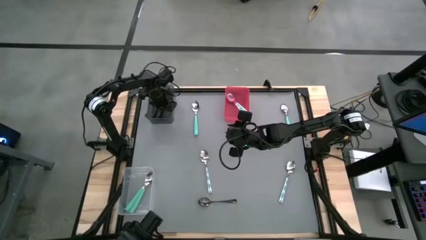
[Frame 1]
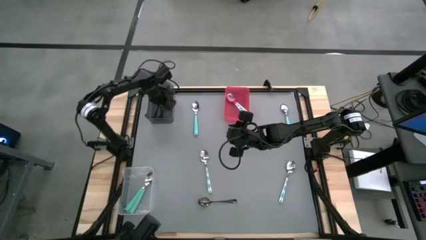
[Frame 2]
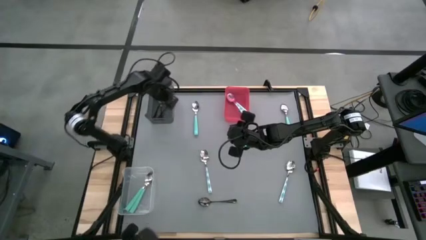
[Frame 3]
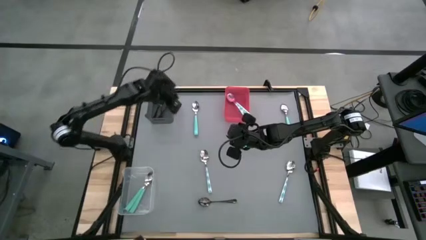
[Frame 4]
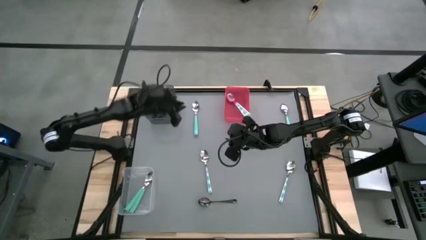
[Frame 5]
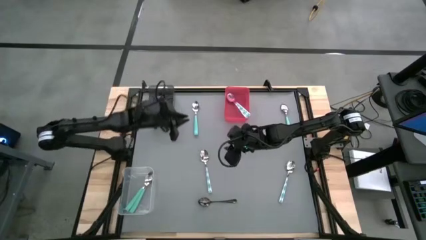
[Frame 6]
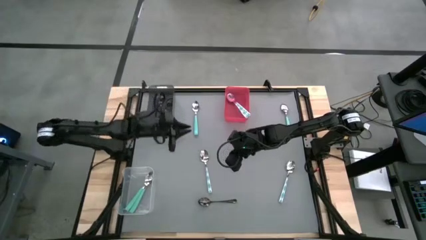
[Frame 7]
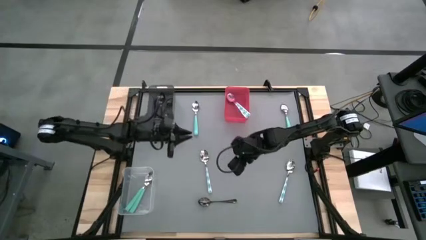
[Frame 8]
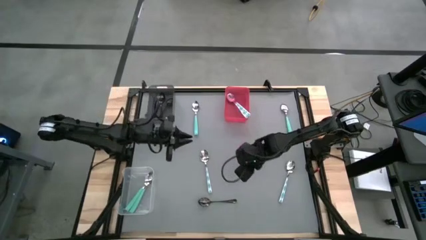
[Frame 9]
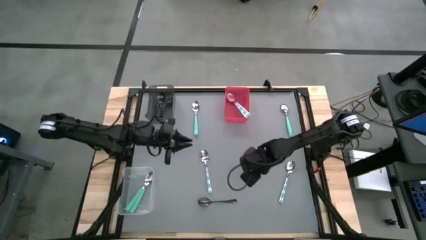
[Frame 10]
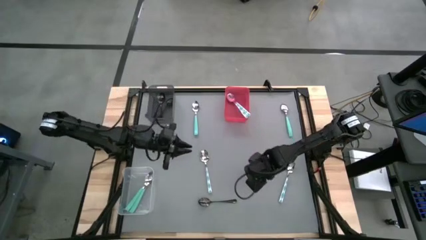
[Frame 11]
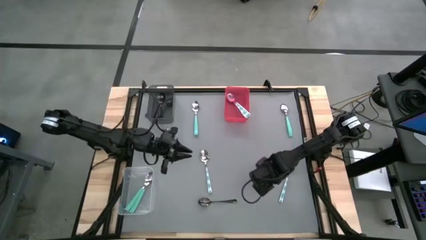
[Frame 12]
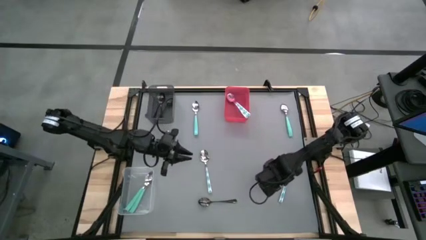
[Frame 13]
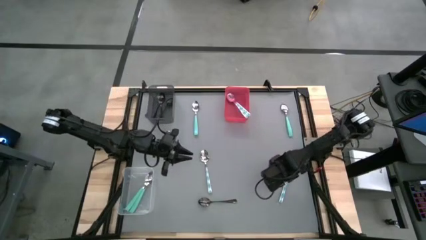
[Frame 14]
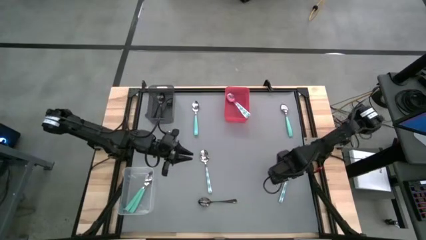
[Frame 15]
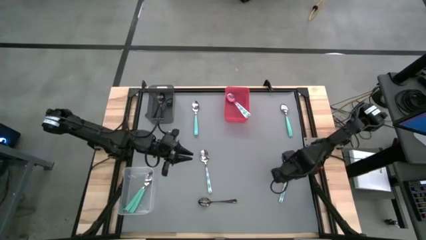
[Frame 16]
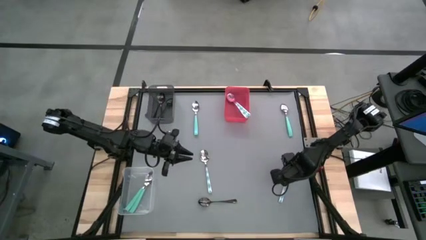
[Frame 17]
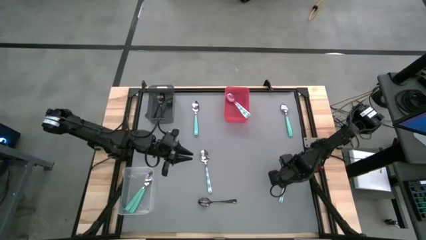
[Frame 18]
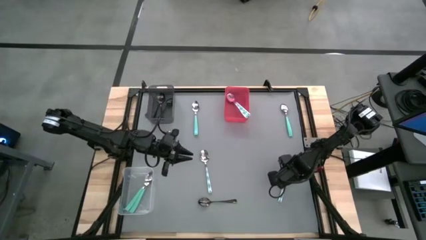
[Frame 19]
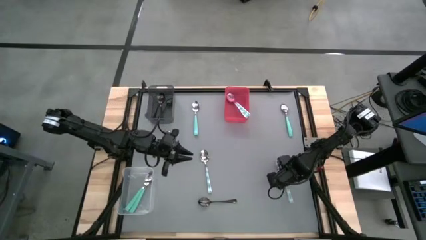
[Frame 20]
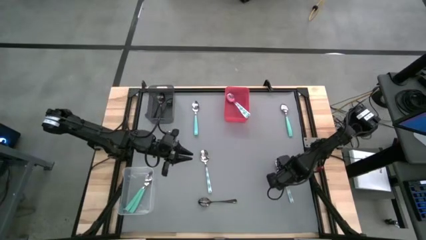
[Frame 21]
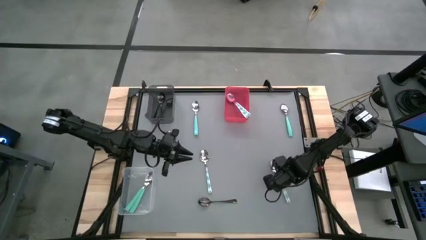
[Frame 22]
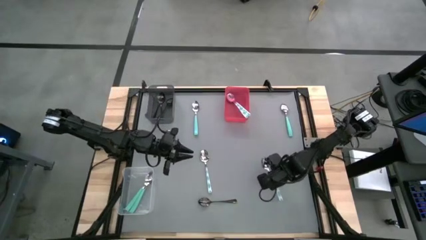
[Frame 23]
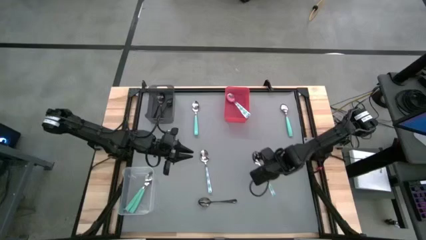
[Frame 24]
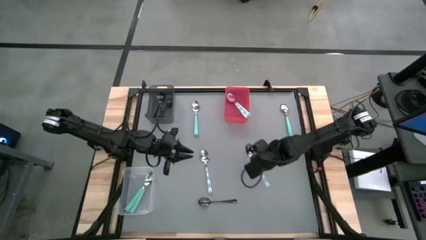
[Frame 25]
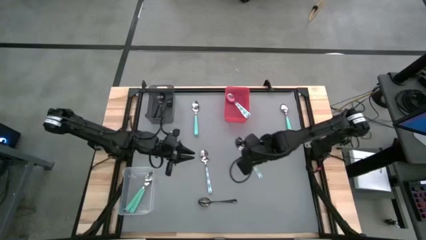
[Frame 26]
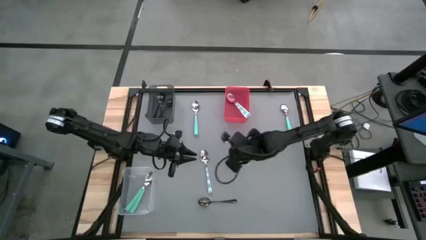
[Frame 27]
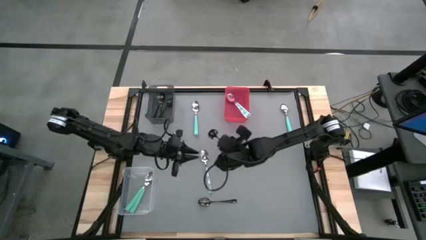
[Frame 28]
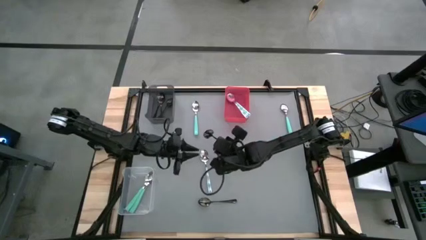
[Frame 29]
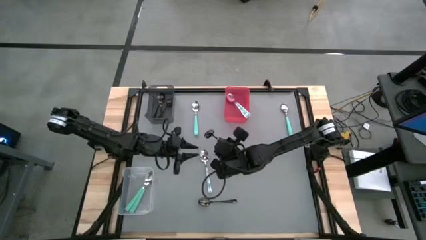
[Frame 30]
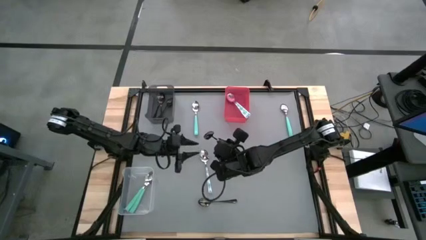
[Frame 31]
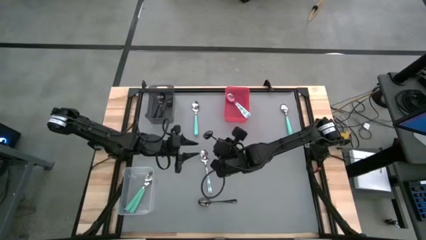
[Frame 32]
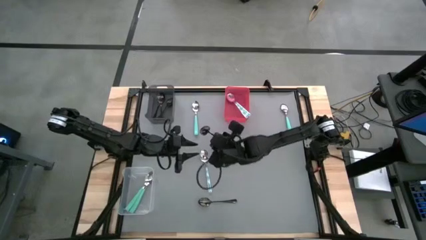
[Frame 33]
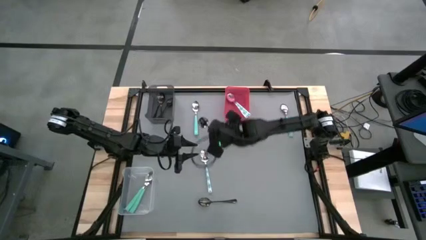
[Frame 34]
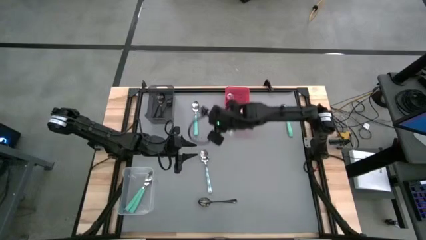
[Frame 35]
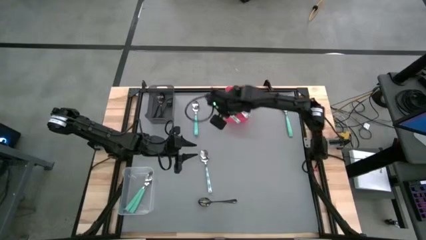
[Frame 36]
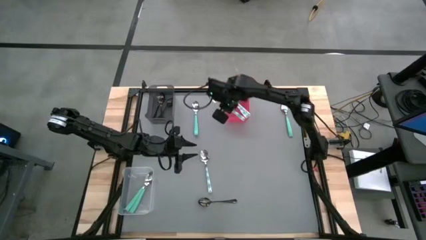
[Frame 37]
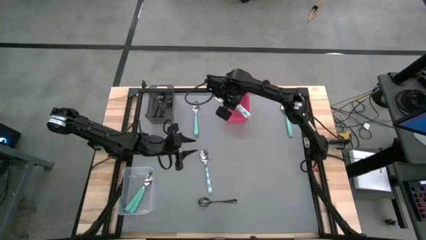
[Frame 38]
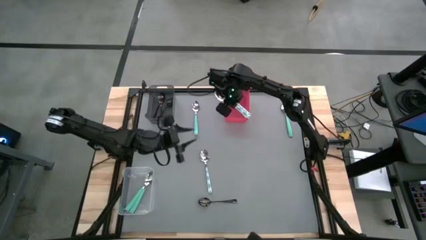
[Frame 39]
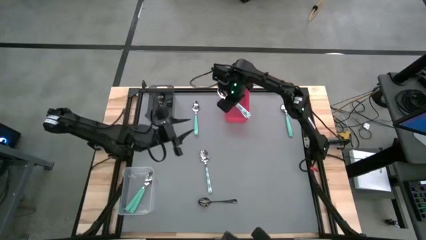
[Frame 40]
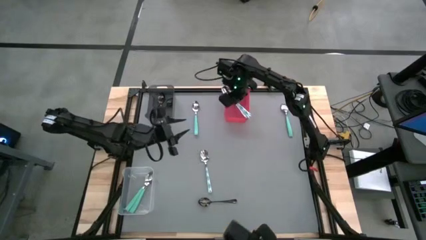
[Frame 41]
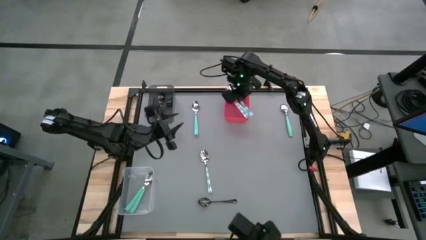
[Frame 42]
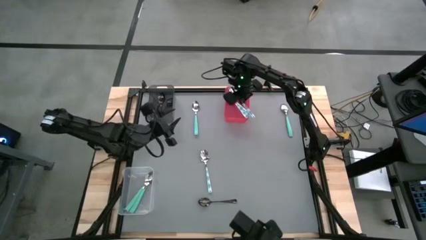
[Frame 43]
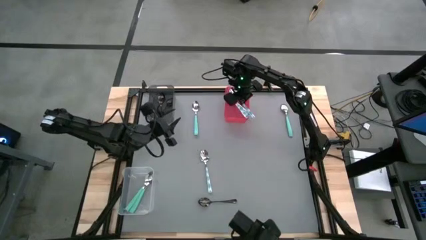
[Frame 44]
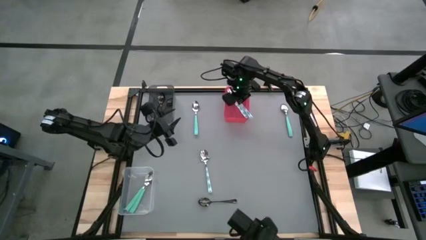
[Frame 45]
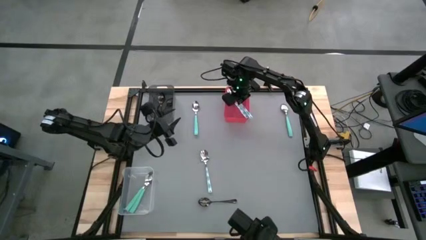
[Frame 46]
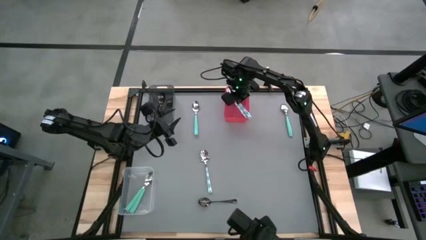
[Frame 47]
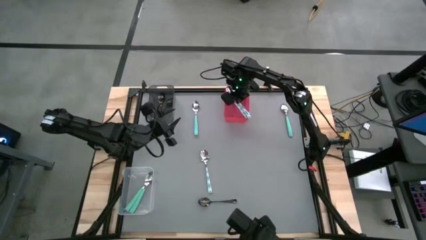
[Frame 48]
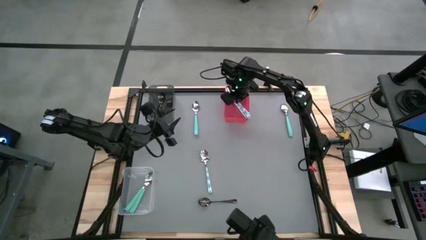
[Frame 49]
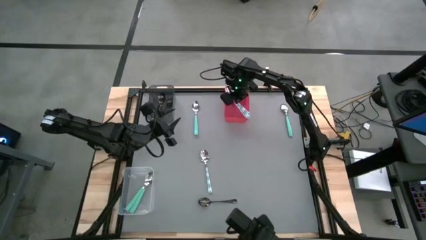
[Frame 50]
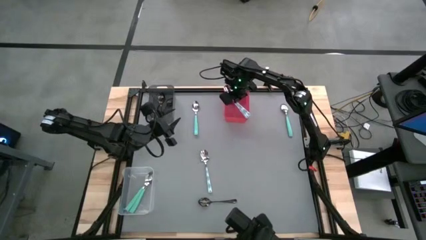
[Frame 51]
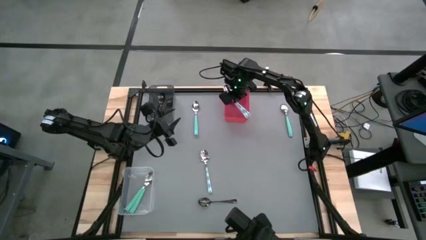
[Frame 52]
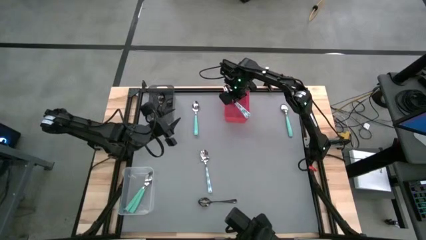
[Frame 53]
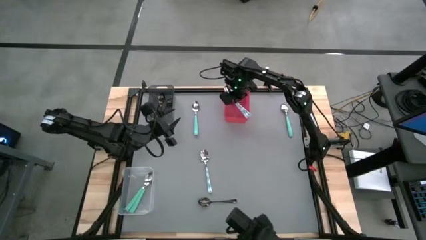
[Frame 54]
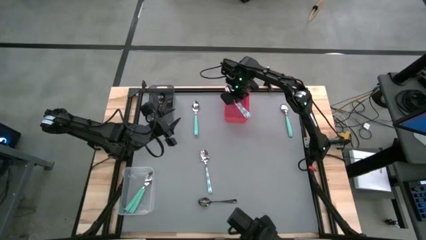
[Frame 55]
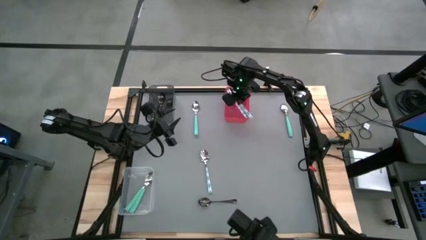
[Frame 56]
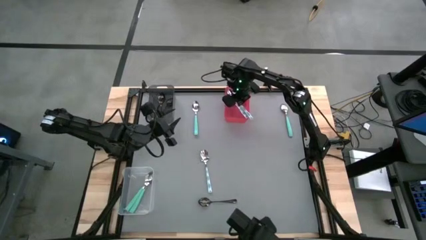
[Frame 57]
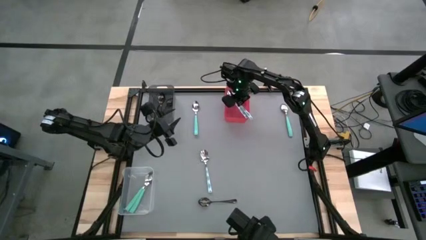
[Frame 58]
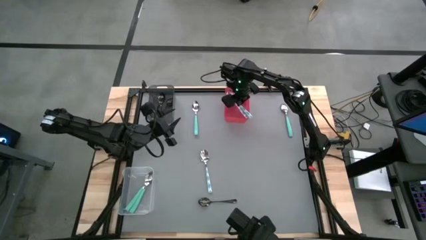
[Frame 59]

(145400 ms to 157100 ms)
Task: Sort silverware by color (type)
Put the white green spoon into the red bin

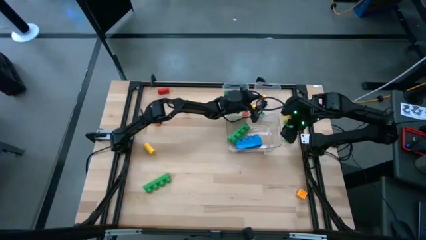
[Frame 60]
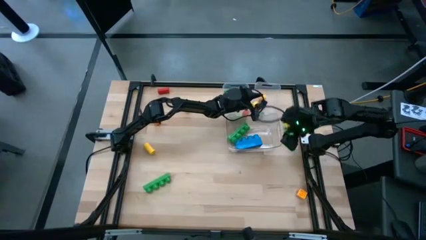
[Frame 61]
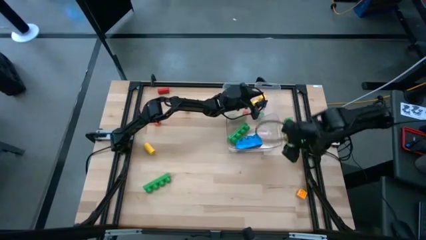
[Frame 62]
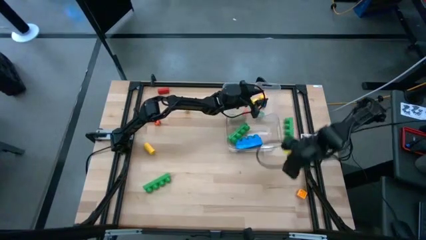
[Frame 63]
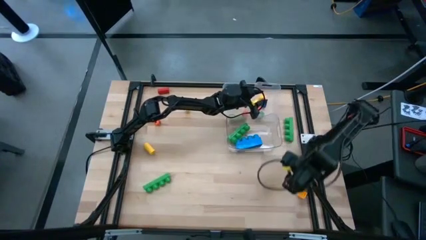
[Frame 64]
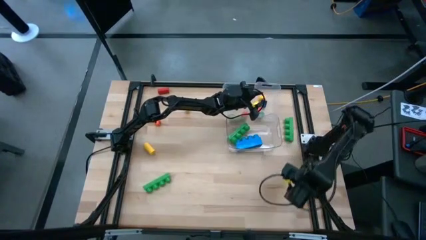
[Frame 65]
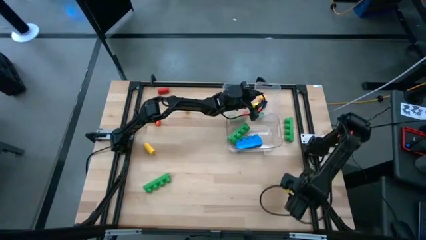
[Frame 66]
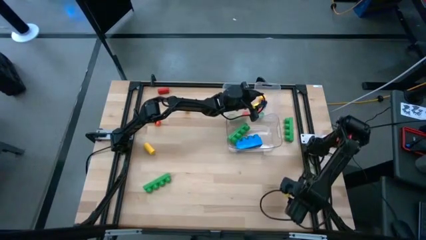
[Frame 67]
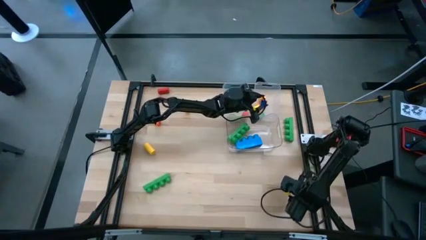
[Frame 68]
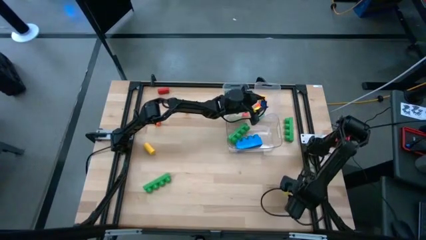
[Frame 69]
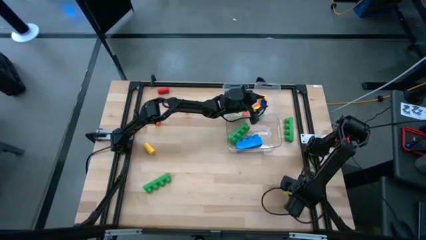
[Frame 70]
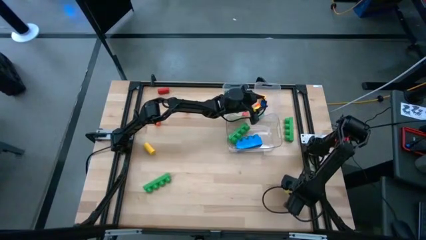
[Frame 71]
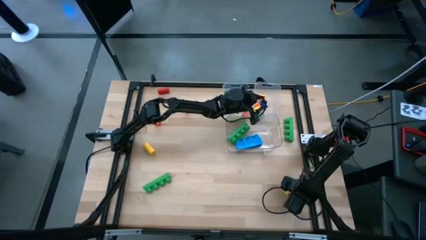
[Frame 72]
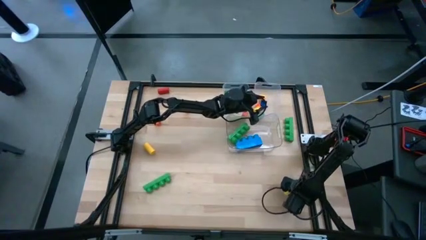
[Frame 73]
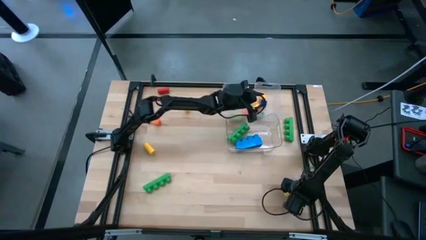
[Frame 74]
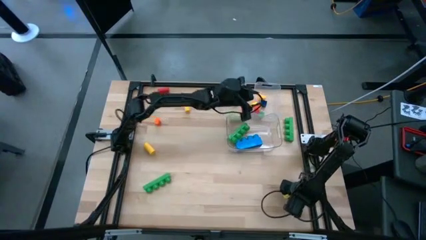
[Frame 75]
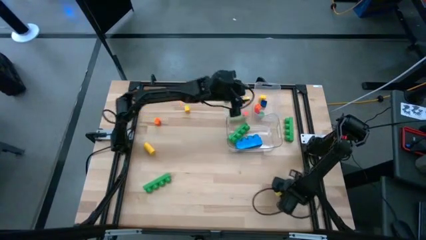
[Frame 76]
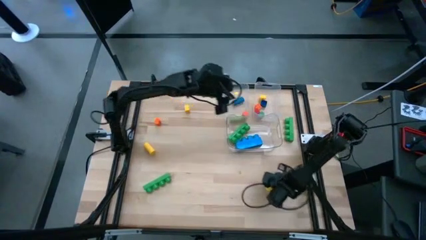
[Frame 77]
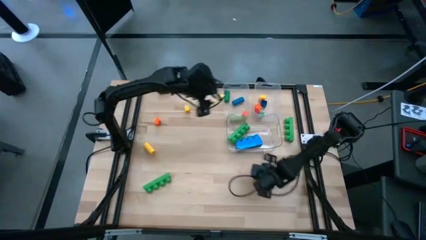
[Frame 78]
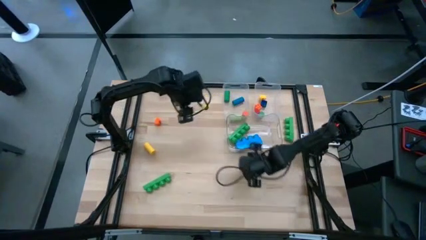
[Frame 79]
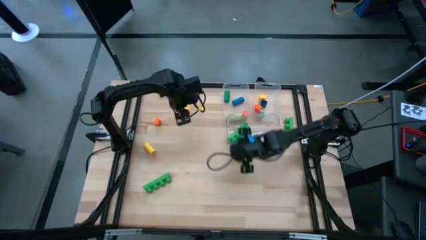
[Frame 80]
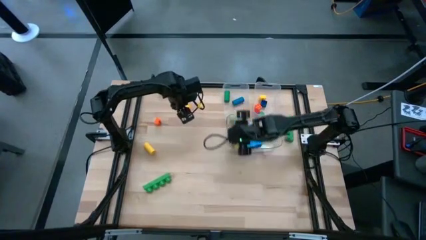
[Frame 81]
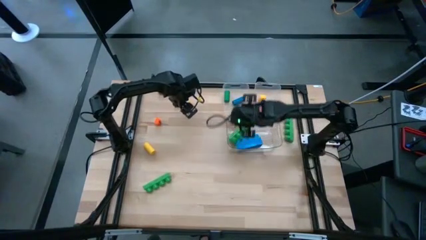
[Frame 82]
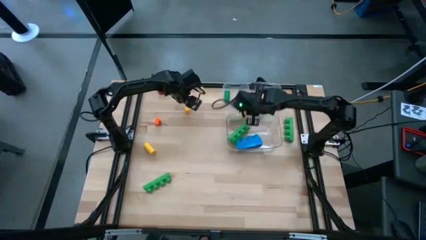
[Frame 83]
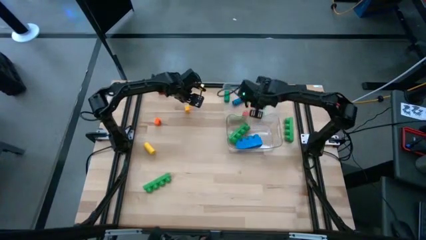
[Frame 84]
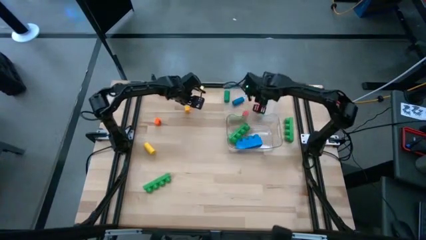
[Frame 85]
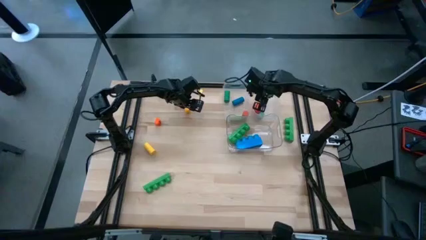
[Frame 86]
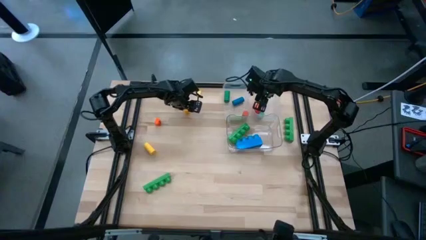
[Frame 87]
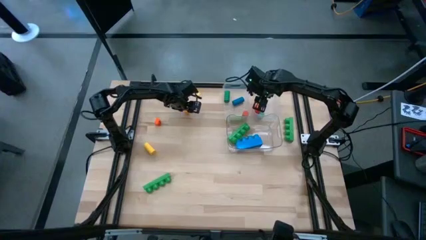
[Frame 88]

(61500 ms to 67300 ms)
Task: Sort blocks by size
Put the bottom small yellow 4 stud game piece into the right transparent bin

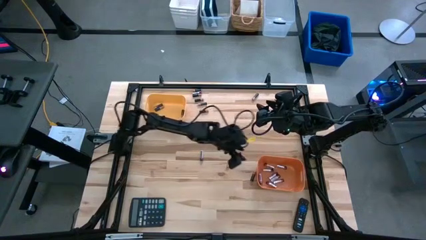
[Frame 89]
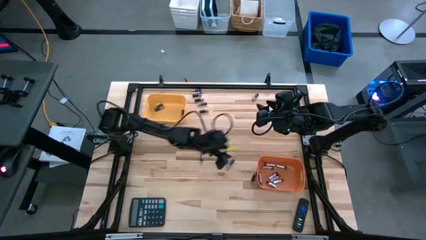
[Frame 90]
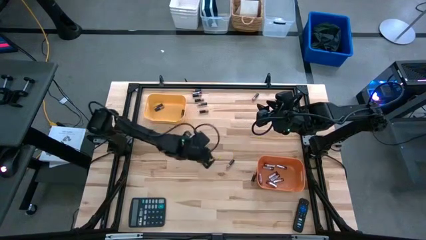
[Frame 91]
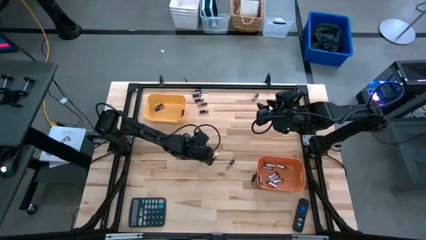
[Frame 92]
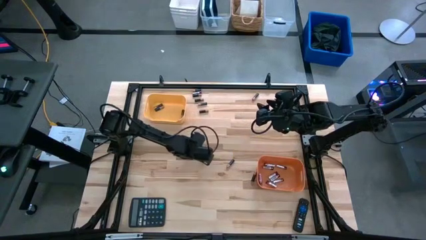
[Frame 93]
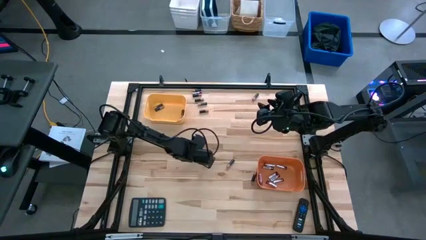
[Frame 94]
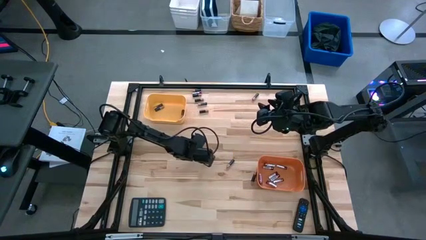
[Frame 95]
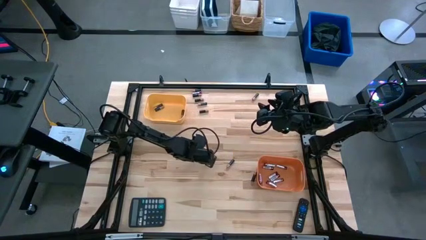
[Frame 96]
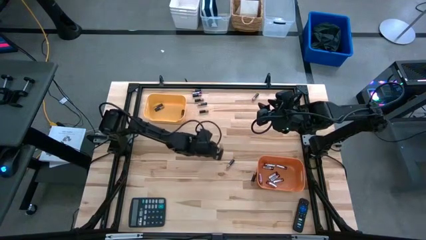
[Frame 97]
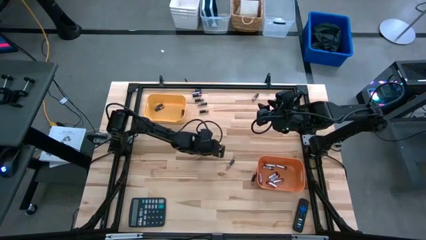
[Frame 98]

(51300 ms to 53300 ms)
Task: Sort batteries
Put the silver battery into the orange bin
